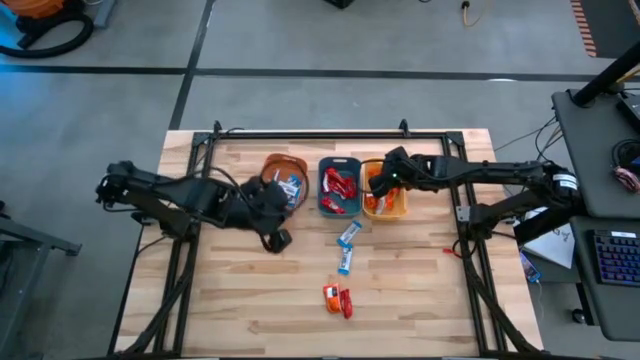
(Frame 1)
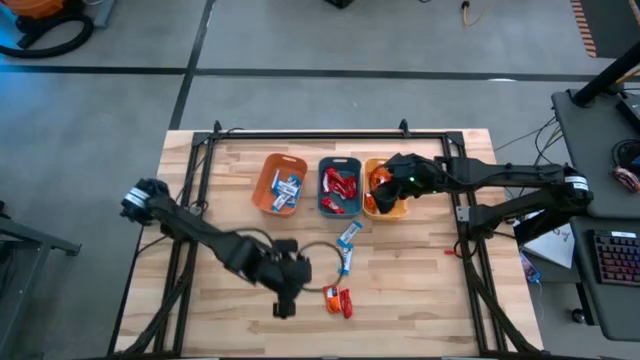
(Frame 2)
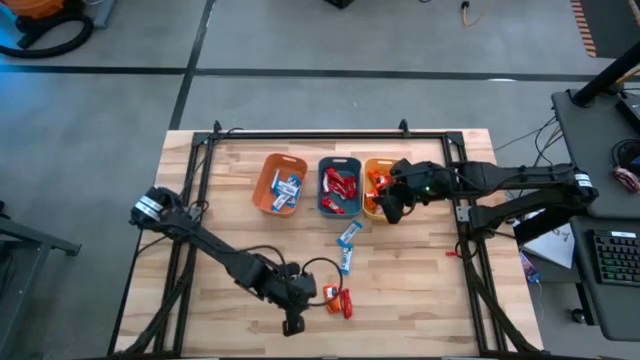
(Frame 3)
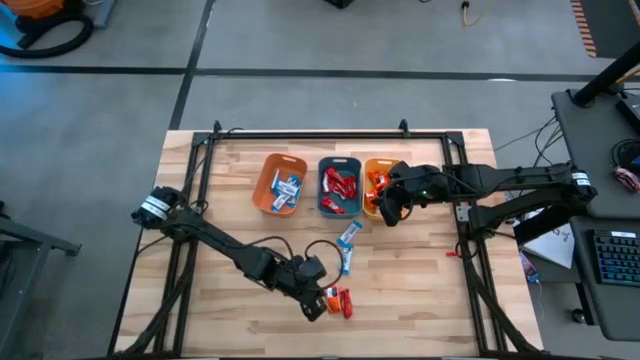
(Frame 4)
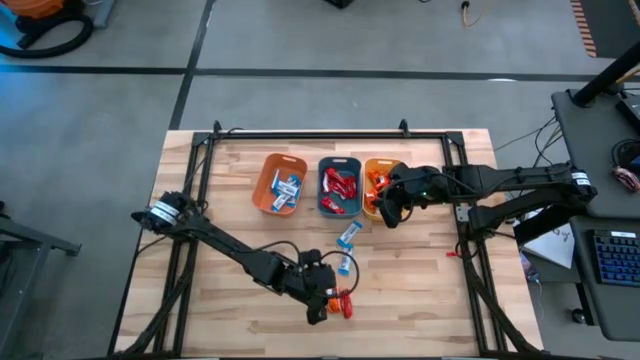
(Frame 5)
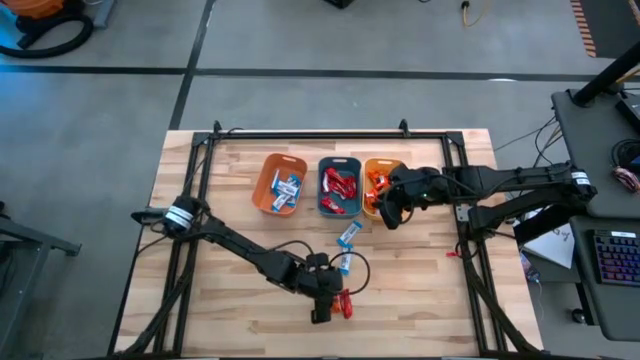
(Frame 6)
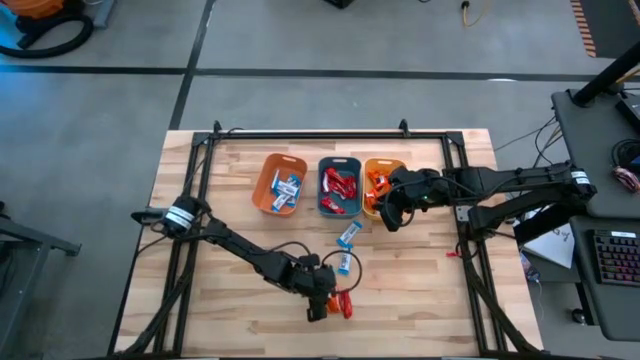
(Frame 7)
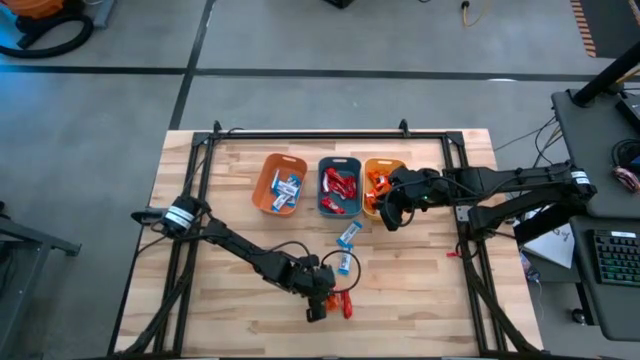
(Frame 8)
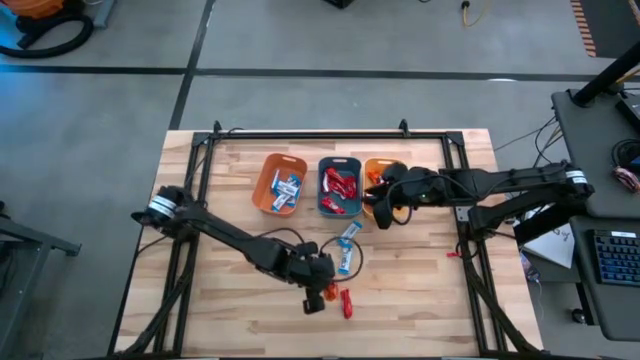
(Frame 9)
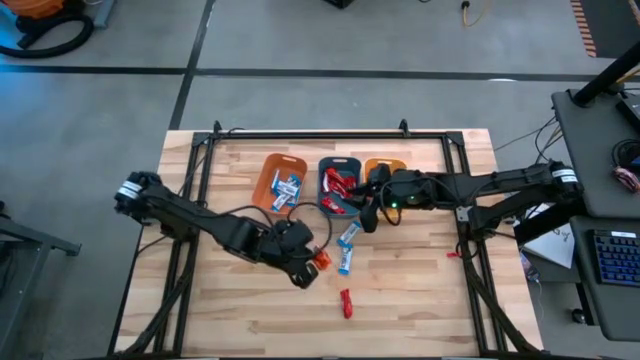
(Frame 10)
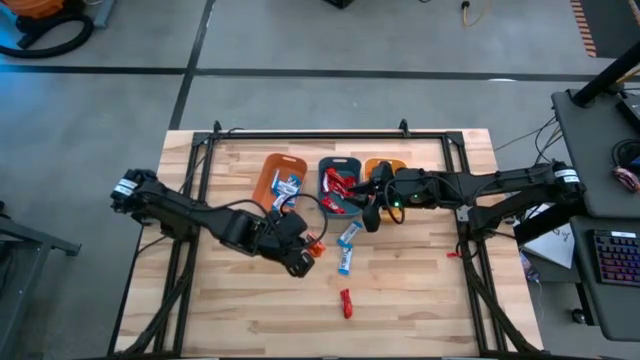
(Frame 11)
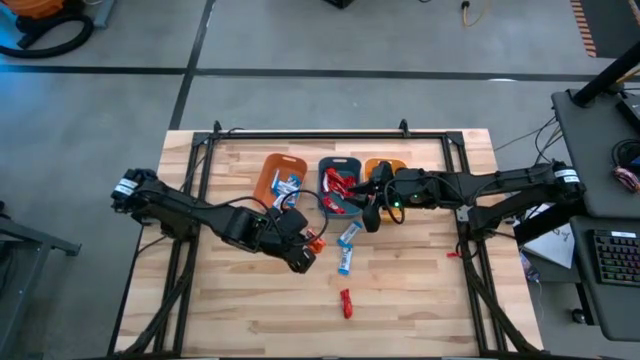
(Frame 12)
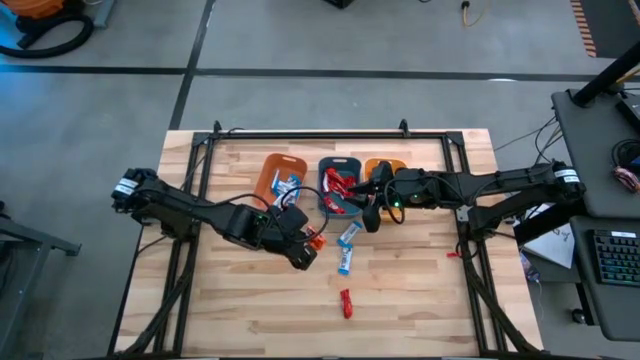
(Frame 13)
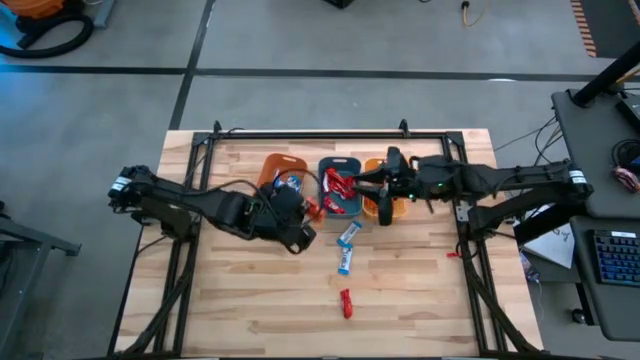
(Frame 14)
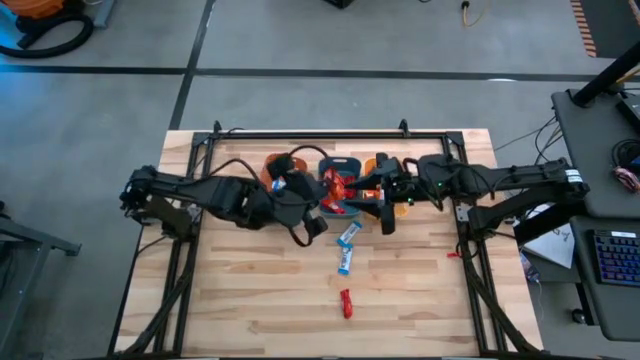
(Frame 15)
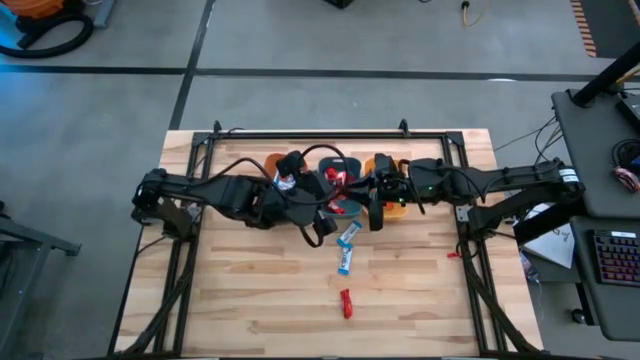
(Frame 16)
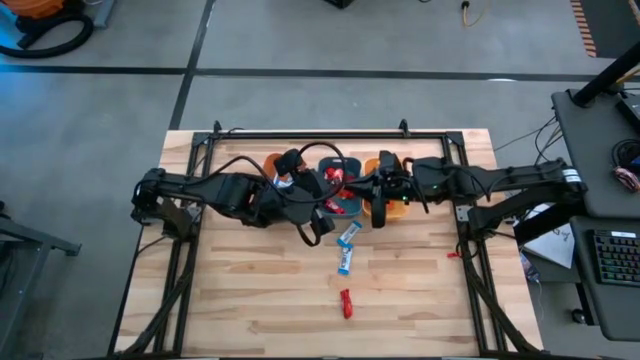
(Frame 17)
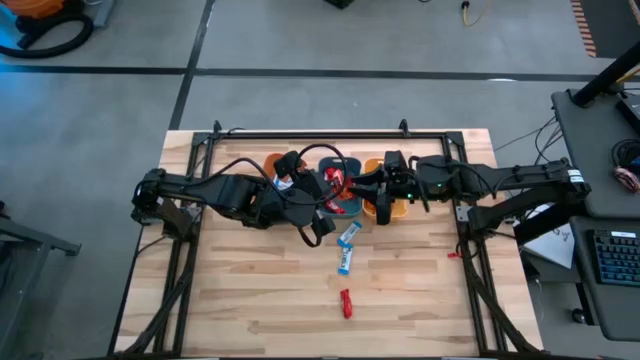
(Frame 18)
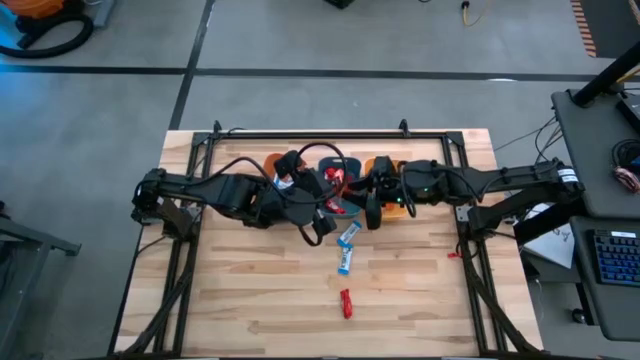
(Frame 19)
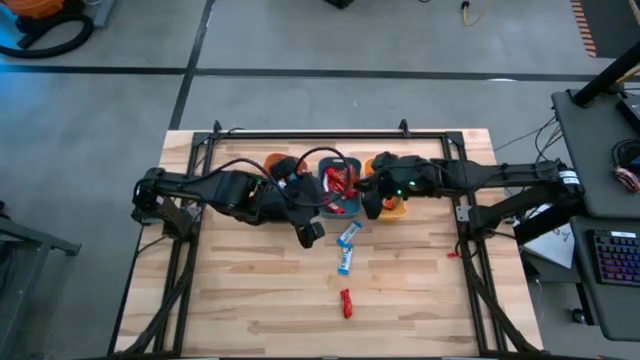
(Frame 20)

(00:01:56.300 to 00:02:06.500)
Task: Sort candy
Put the orange chocolate bar into the yellow bin

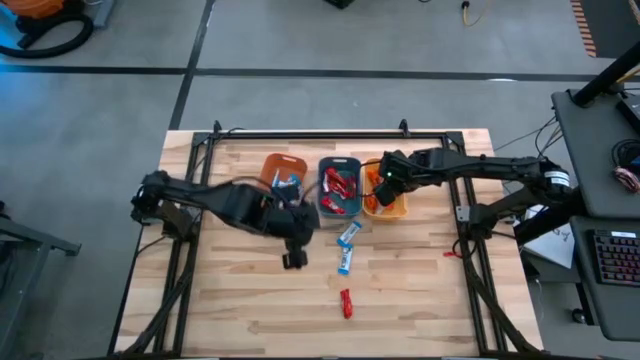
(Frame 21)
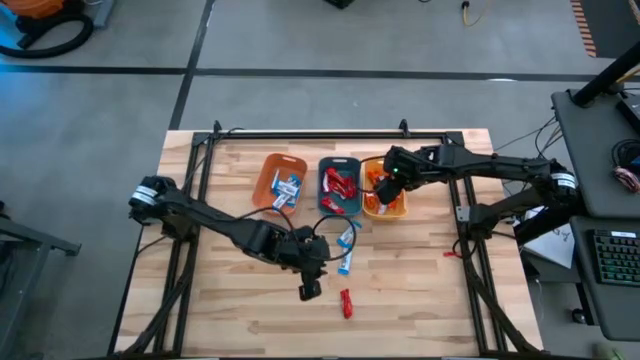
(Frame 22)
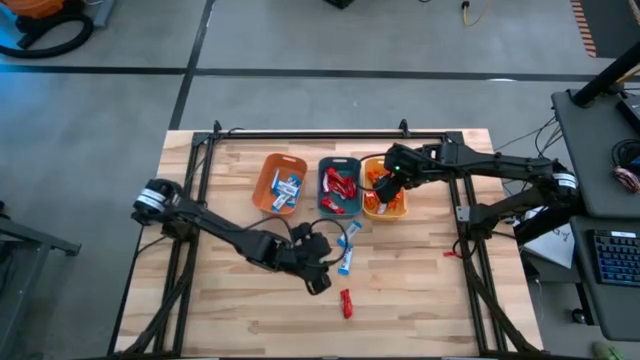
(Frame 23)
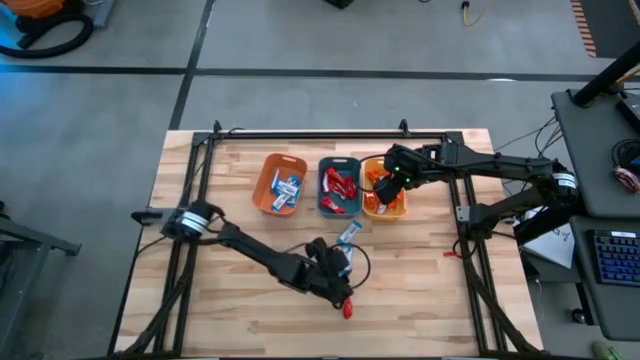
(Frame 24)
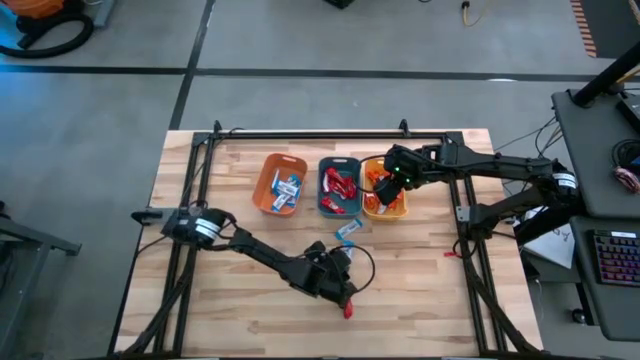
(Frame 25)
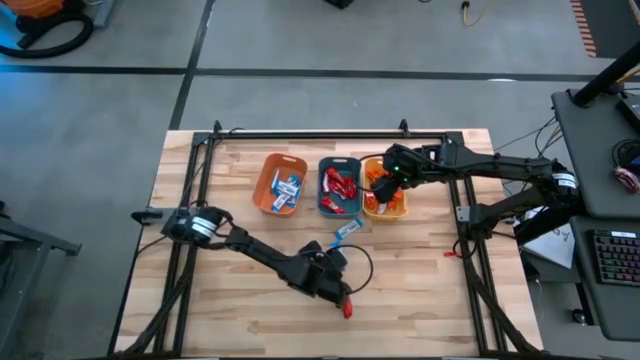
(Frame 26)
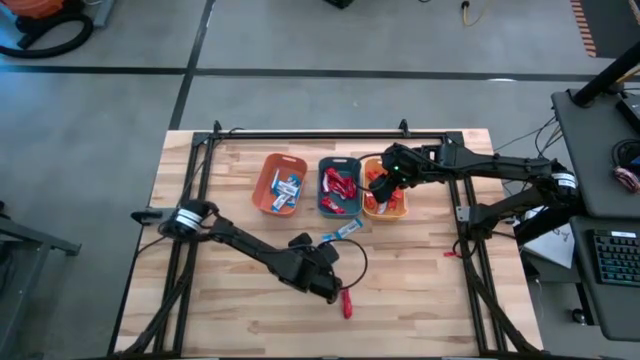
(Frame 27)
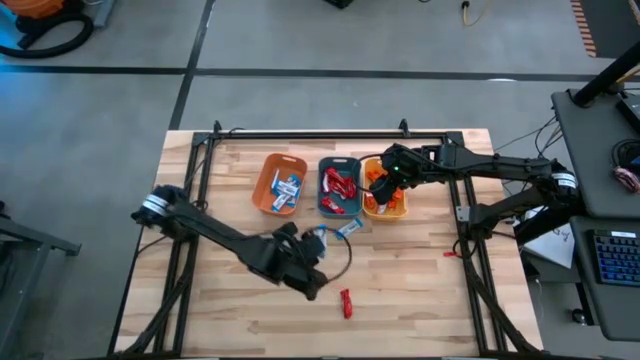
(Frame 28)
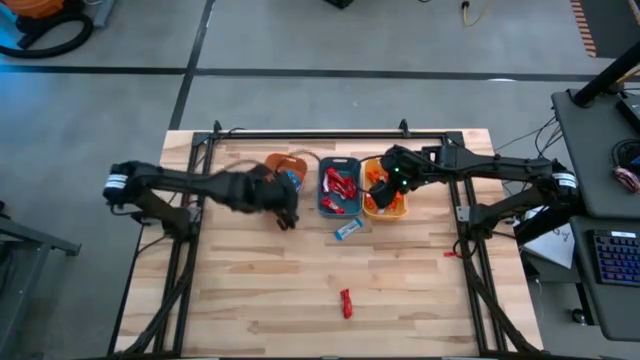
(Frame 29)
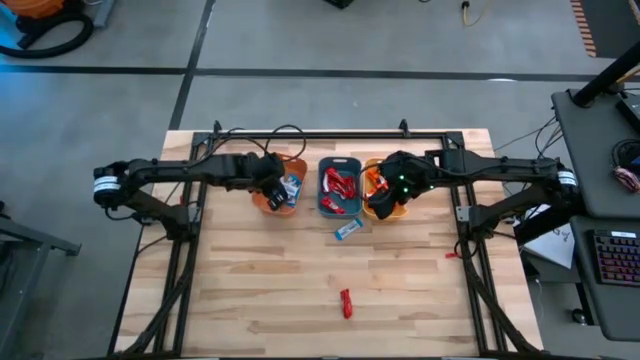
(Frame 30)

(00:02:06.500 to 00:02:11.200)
Put the white chocolate bar into the orange bin

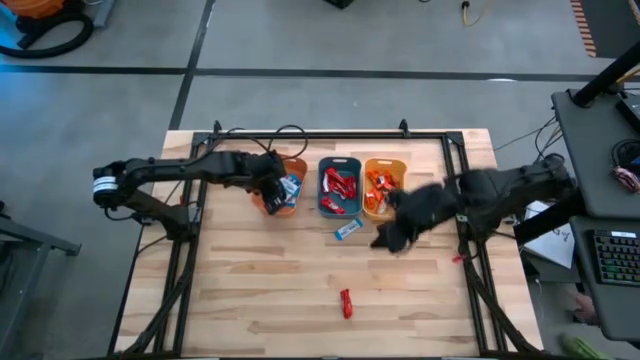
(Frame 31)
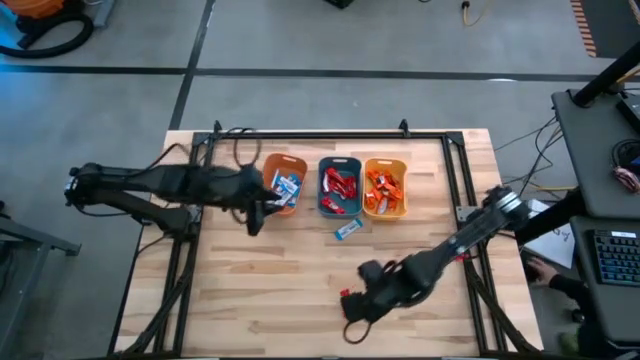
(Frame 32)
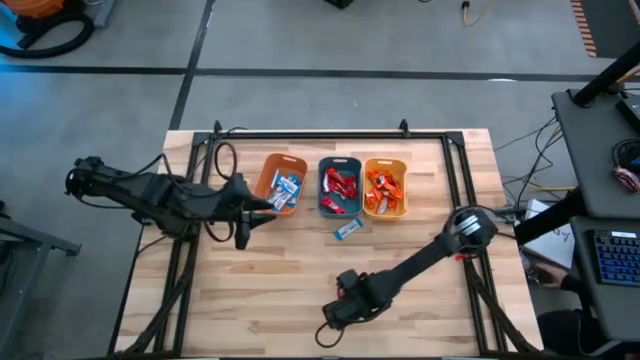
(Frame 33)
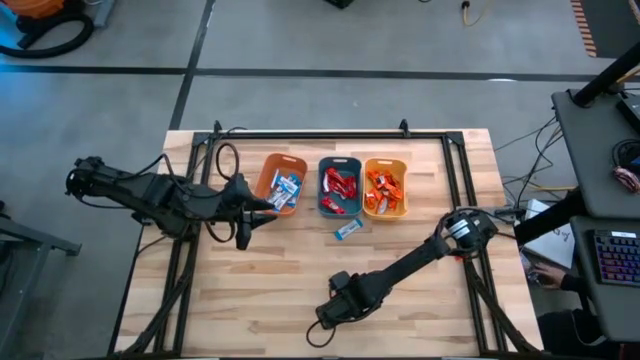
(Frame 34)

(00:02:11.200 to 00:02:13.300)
Put the red chocolate bar into the blue bin

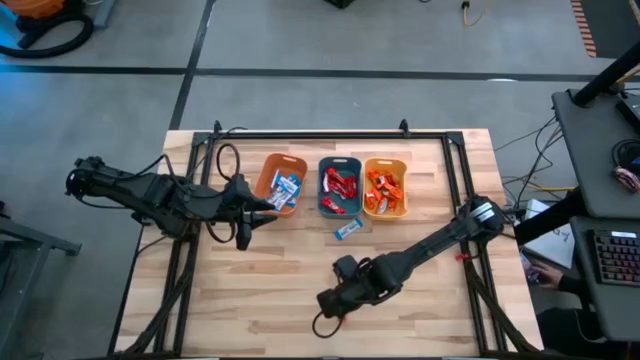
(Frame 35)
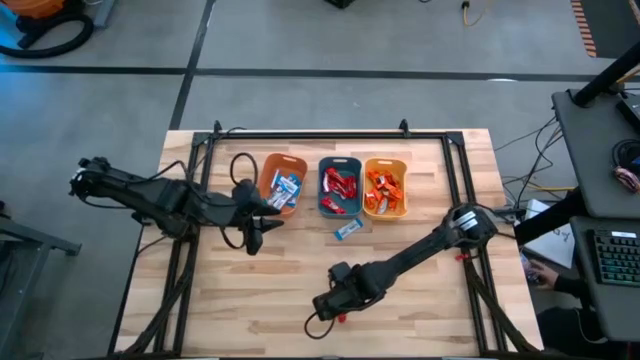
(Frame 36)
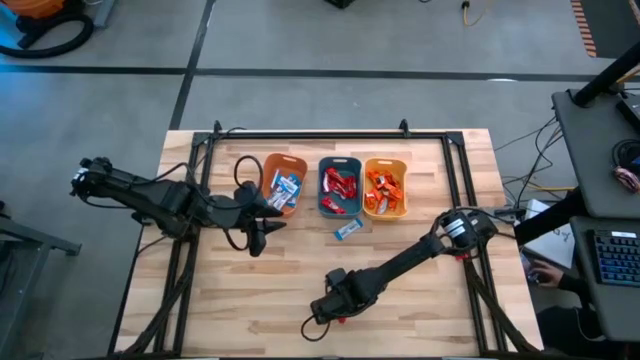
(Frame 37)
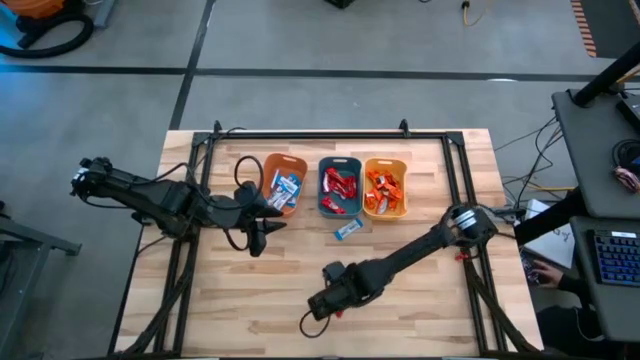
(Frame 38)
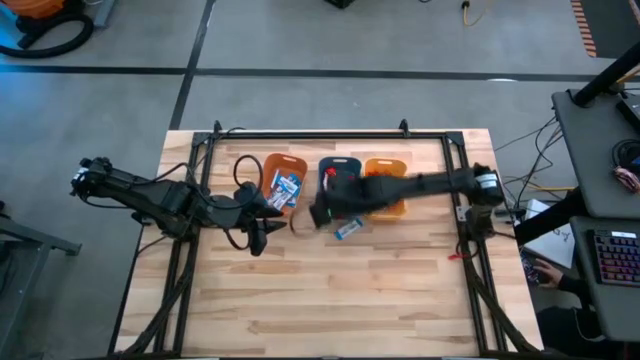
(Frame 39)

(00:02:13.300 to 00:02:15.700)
Put the red chocolate bar into the blue bin

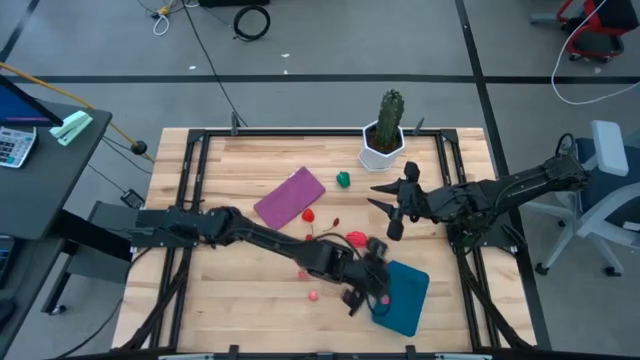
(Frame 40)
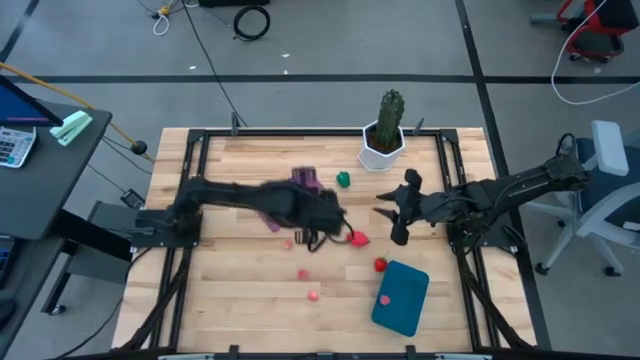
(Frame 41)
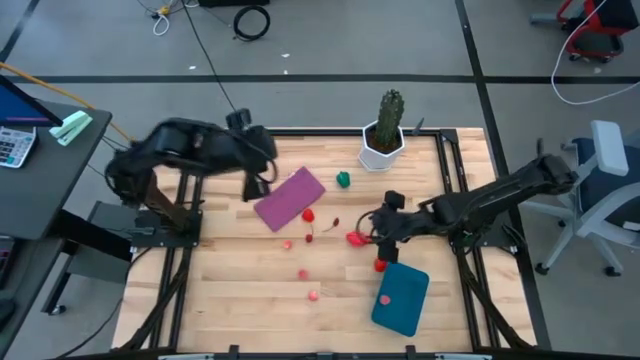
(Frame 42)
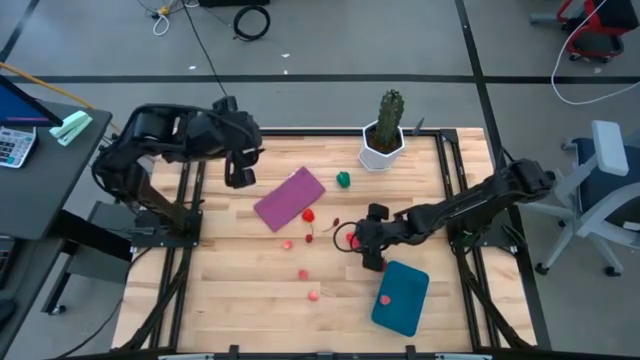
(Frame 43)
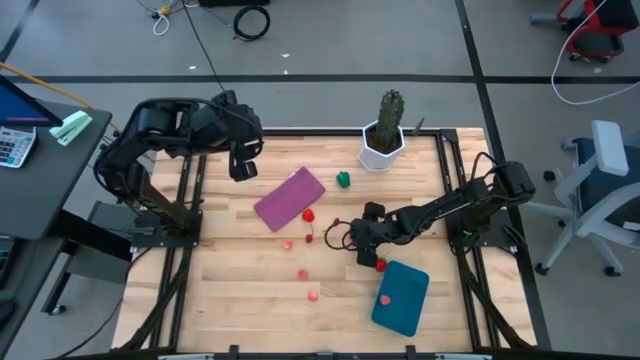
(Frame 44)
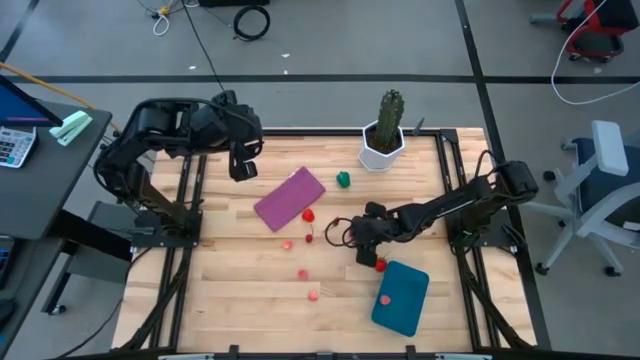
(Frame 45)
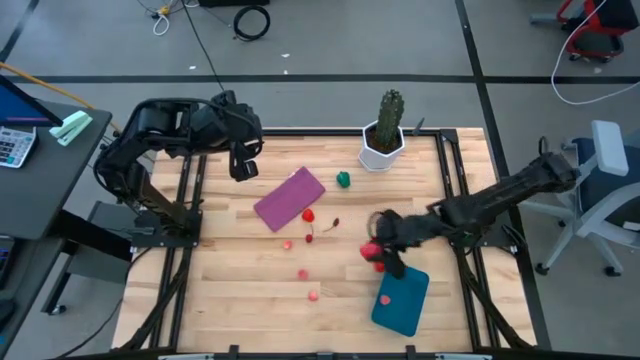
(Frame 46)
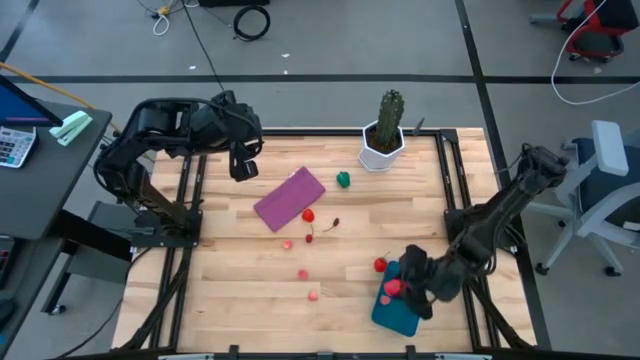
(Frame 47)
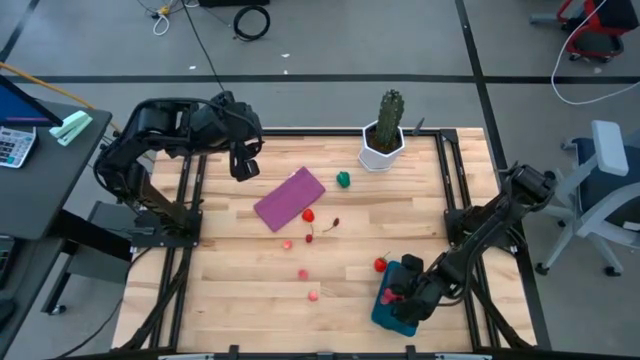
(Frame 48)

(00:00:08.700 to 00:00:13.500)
Task: Pick and placing Produce into tupperware
Put the dragonfruit into the blue bin
